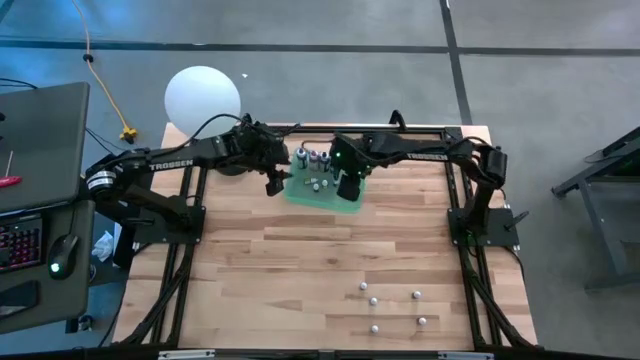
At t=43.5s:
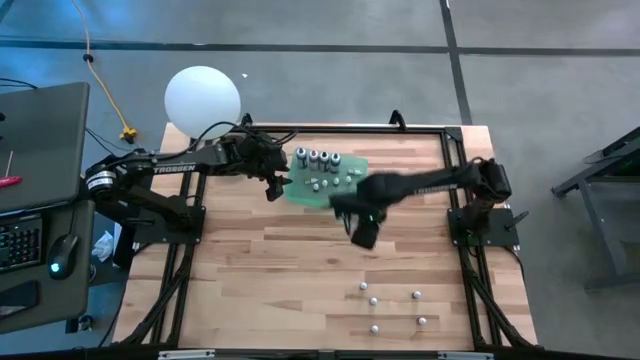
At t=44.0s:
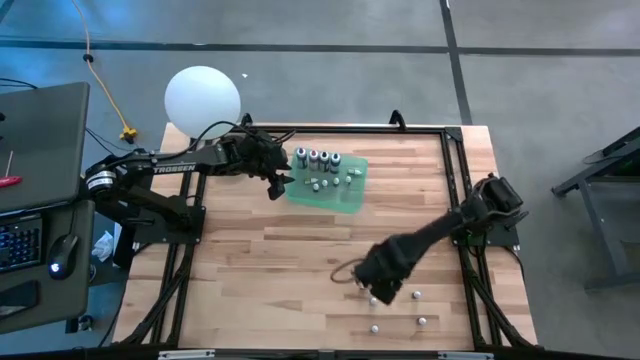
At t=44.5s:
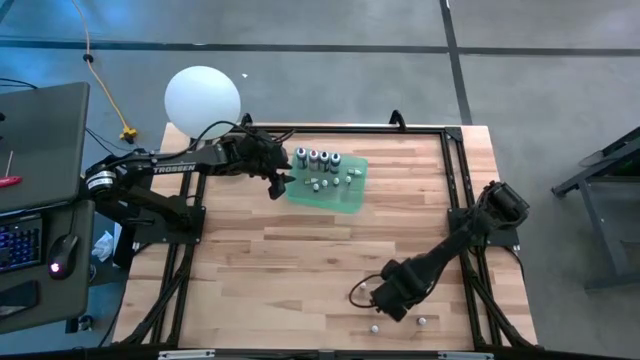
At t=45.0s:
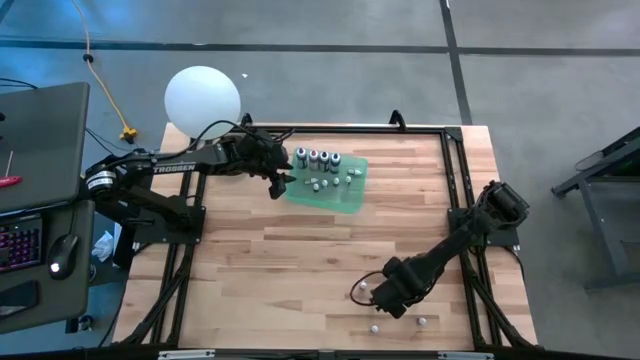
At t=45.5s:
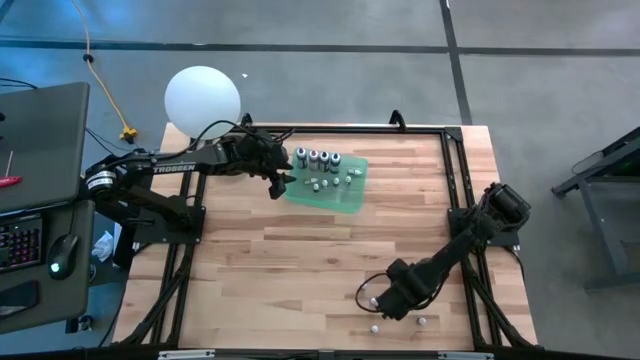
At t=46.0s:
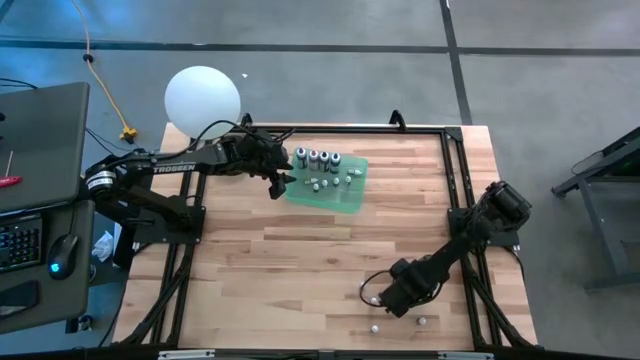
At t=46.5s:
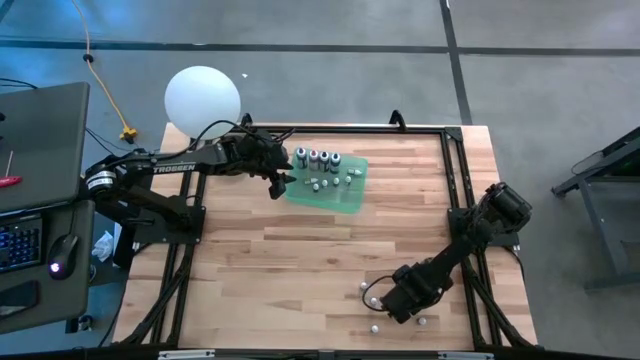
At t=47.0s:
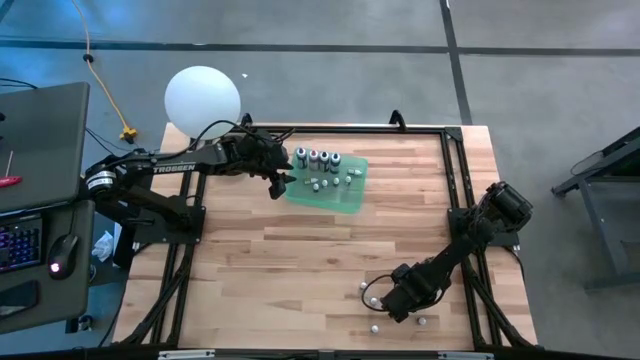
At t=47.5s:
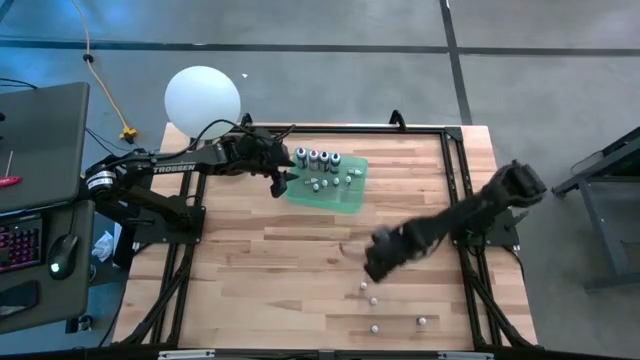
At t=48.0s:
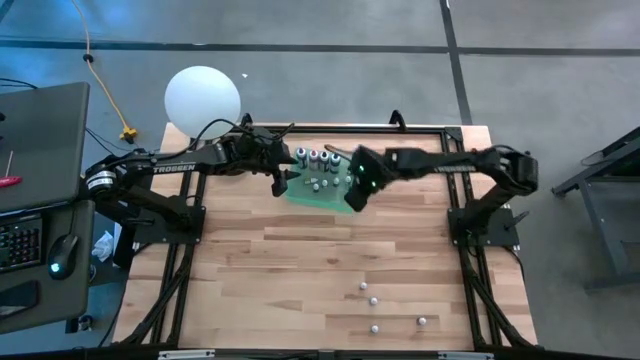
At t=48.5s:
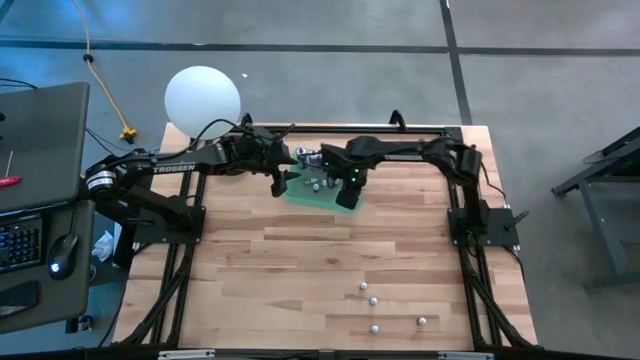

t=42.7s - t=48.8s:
Task: Pick & Place food coloring
Put the blue food coloring bottle into the bin

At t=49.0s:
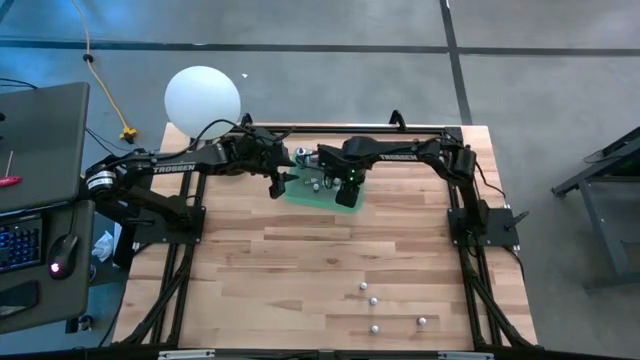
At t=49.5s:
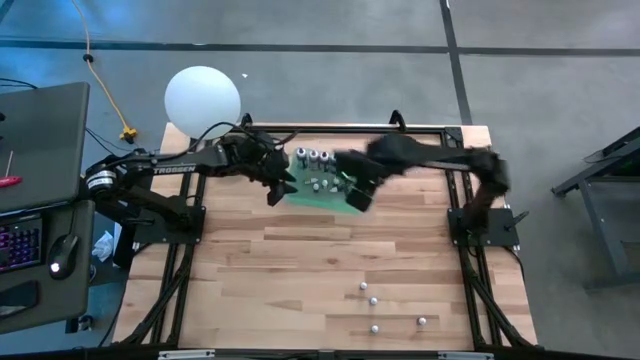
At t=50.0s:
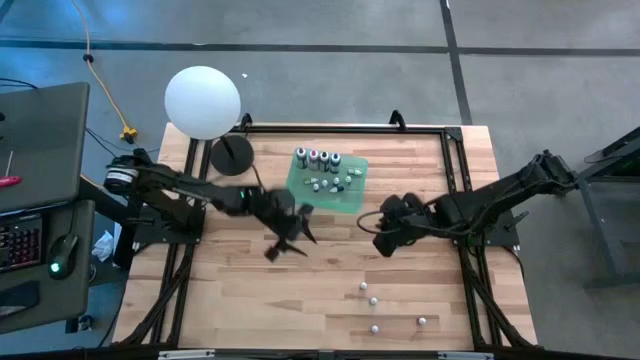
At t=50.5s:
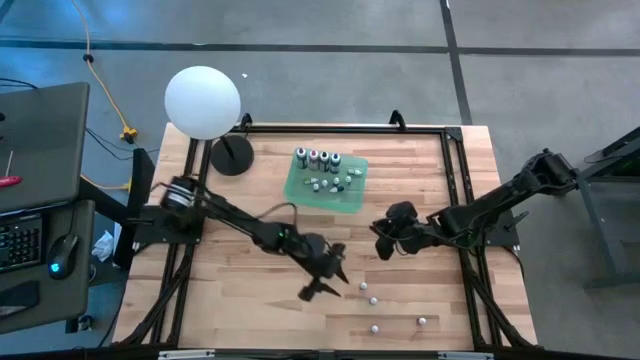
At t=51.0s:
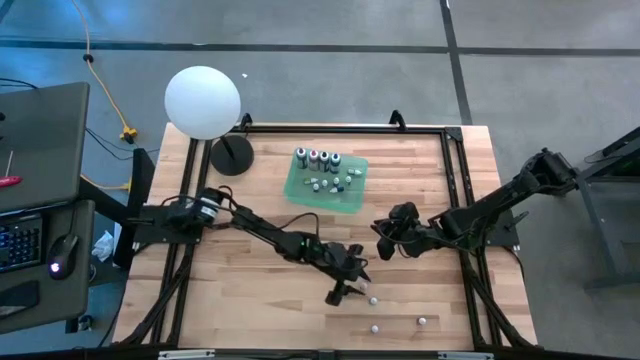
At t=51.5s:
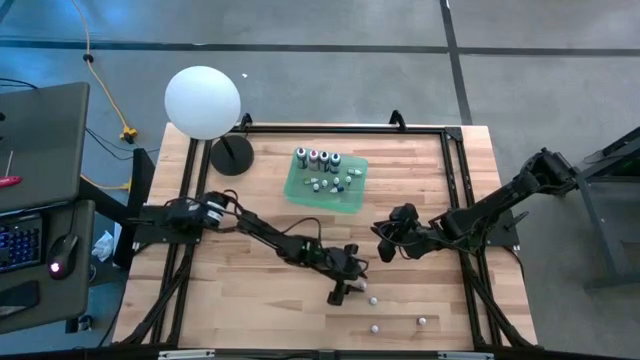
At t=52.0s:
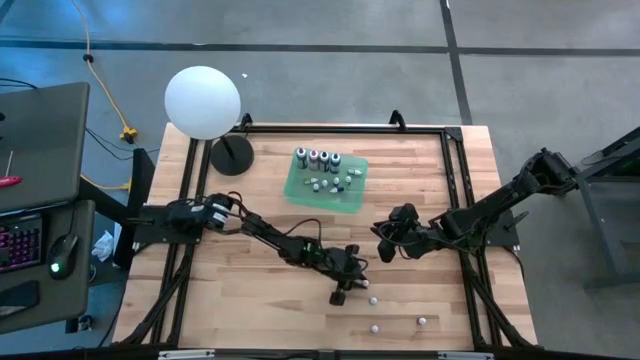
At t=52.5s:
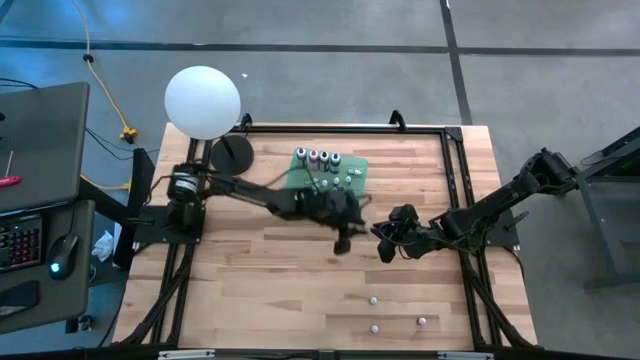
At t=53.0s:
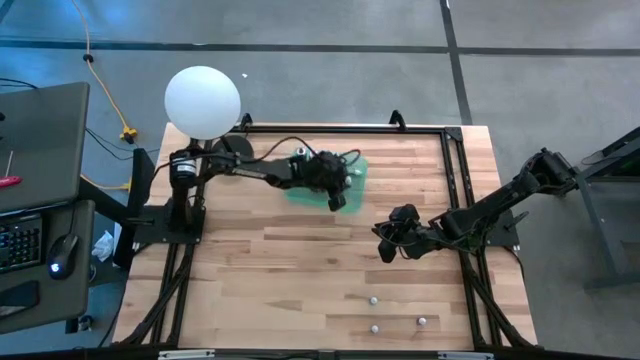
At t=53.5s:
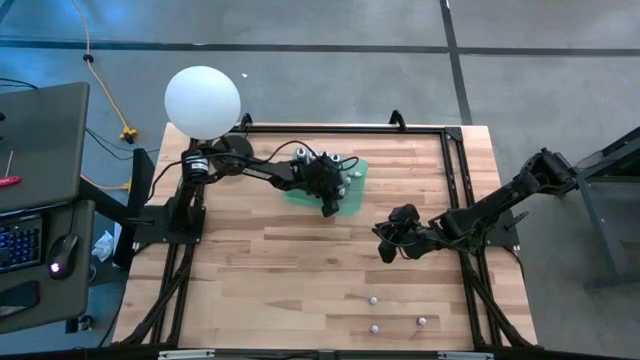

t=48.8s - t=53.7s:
Put the top black food coloring bottle into the bin

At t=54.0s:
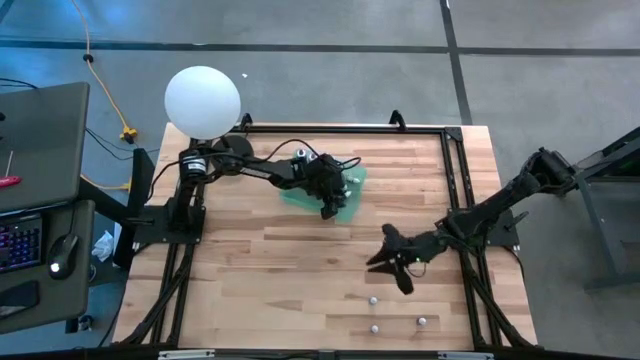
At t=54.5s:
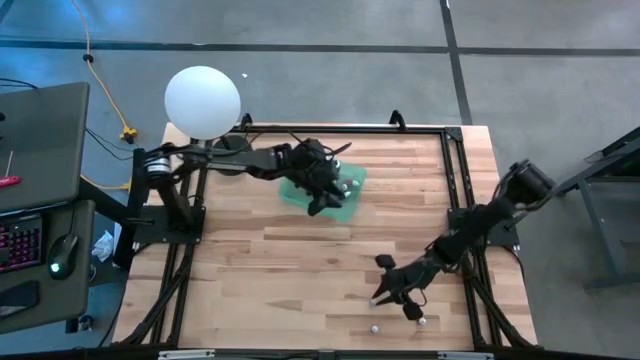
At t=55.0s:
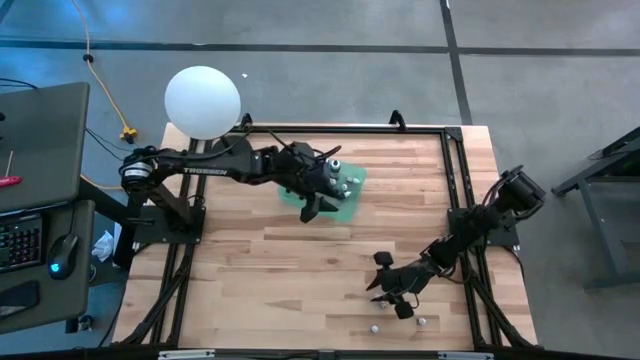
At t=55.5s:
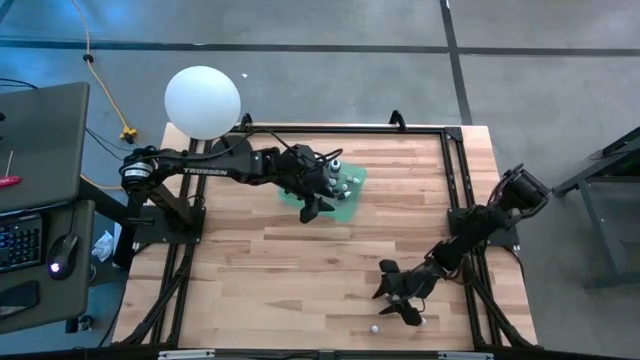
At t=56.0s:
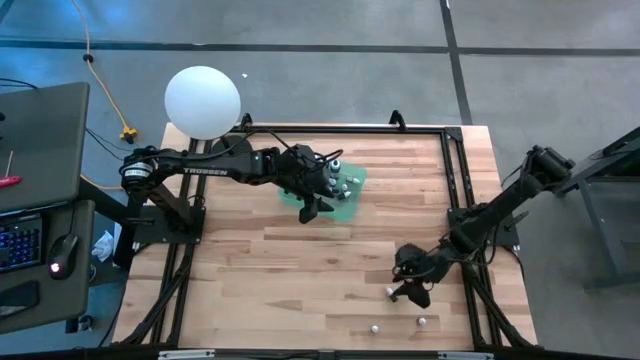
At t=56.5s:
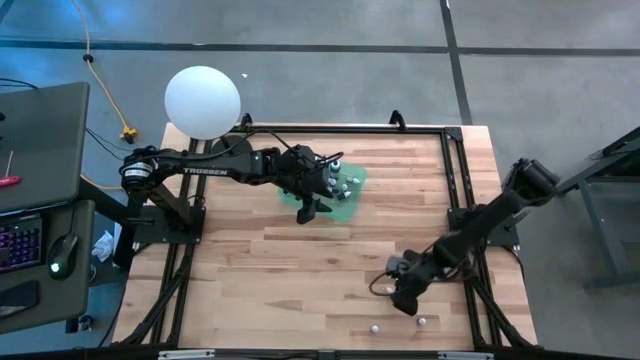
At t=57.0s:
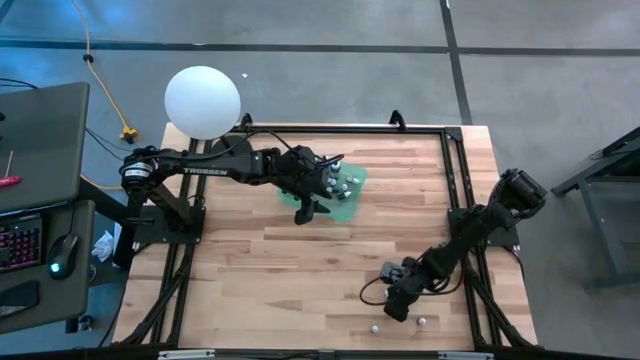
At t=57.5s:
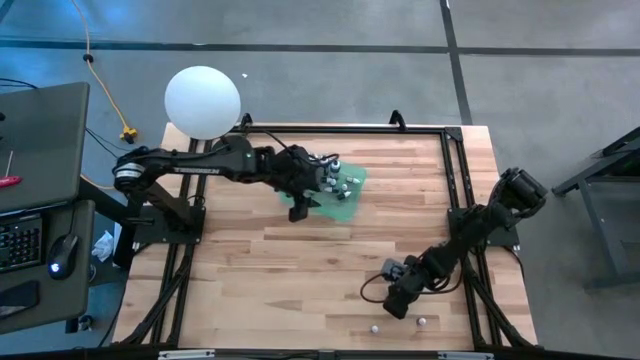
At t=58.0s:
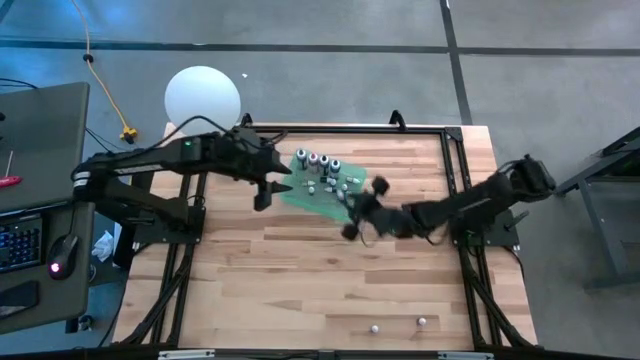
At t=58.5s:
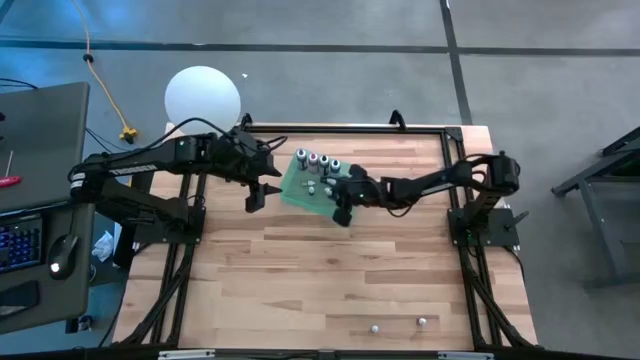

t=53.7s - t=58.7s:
Put the black food coloring bottle into the bin

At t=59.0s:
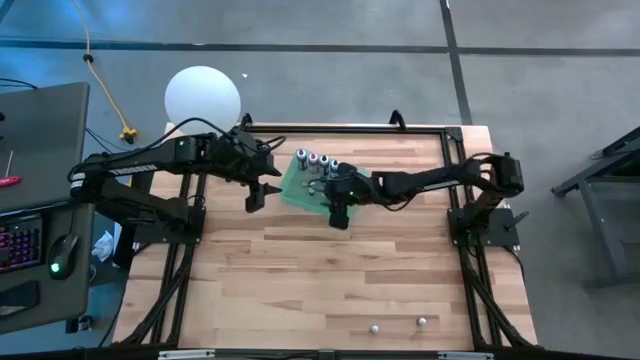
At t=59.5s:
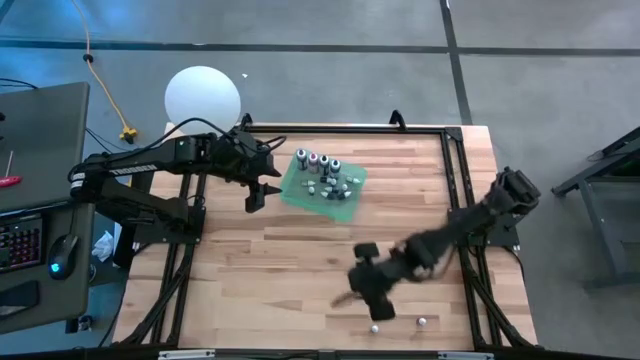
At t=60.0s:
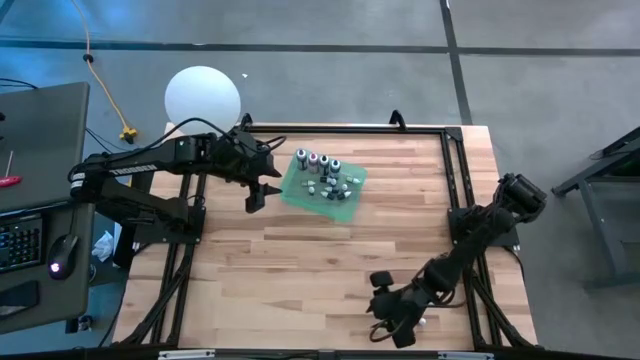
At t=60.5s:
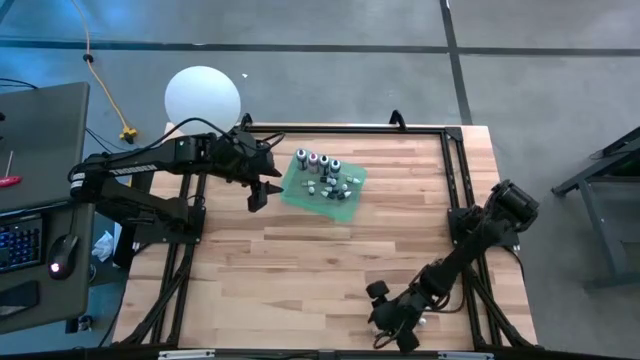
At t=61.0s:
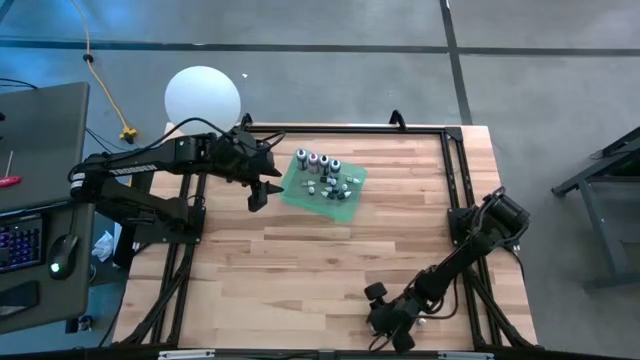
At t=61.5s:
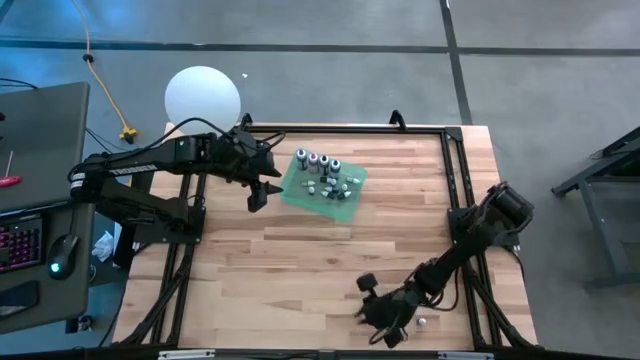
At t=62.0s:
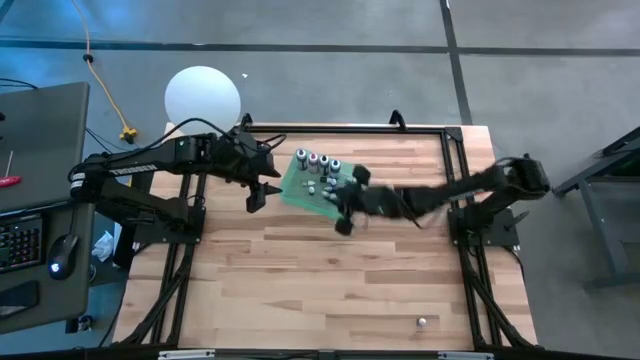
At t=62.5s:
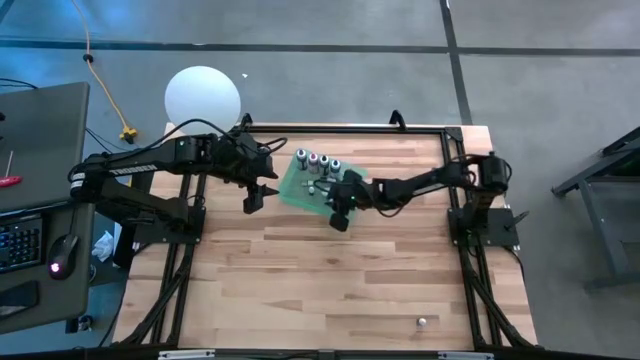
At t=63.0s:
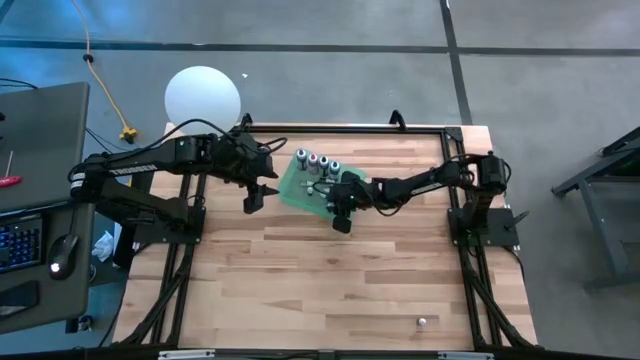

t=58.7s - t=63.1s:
Put the green food coloring bottle into the bin

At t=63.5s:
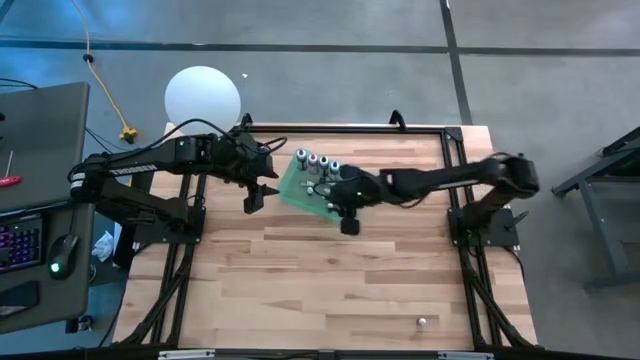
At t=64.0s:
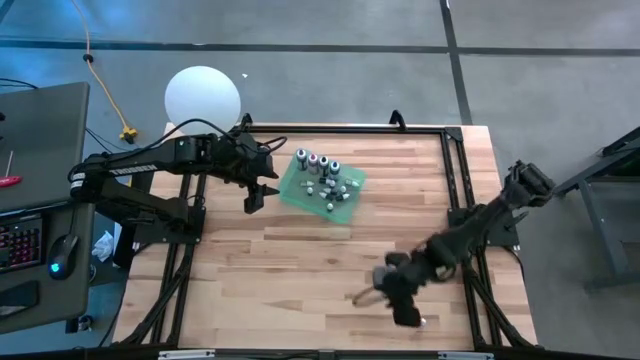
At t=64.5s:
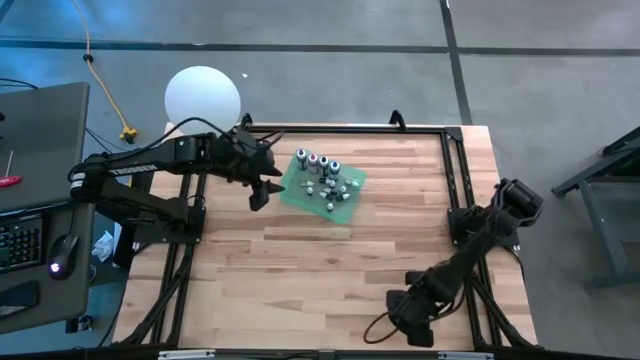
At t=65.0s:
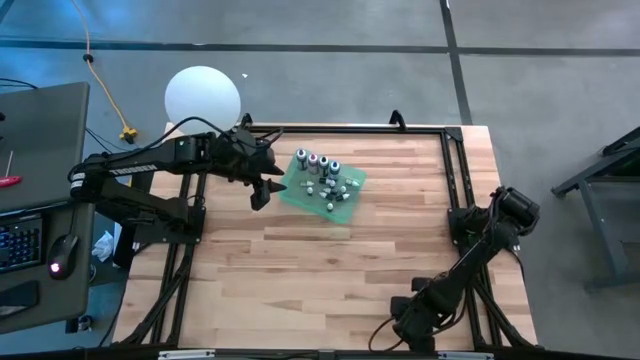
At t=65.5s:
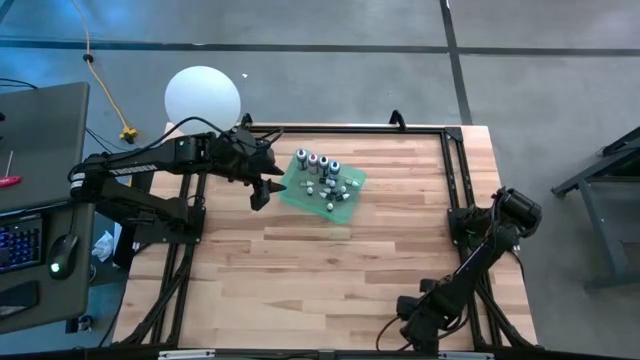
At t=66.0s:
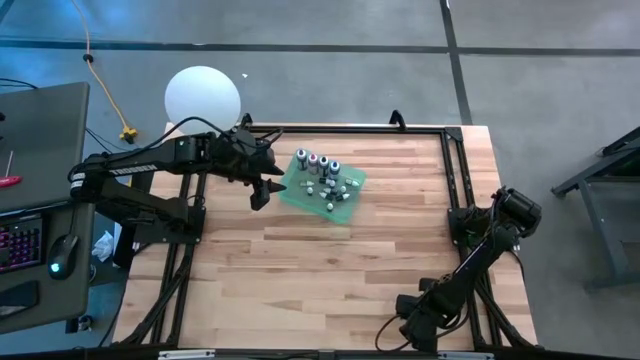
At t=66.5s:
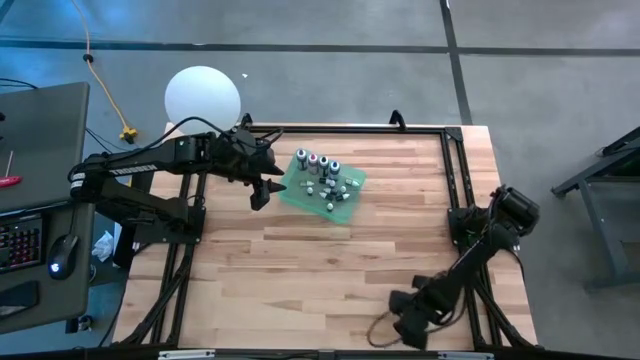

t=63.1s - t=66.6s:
Put the orange food coloring bottle into the bin
